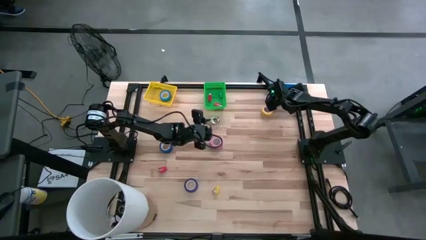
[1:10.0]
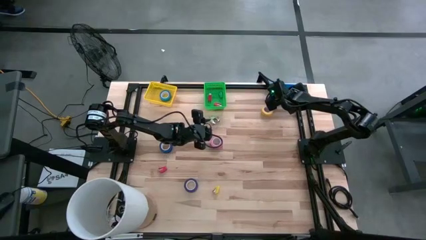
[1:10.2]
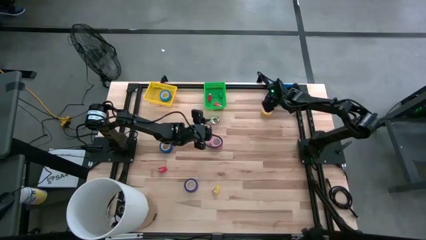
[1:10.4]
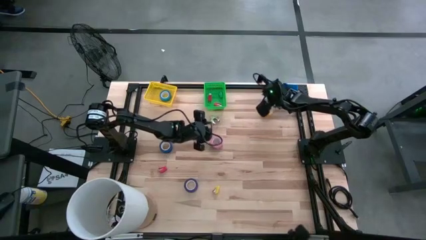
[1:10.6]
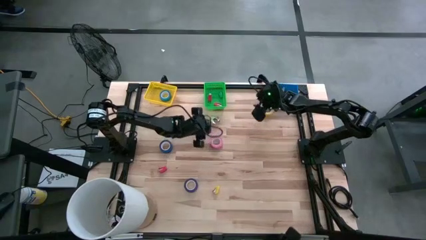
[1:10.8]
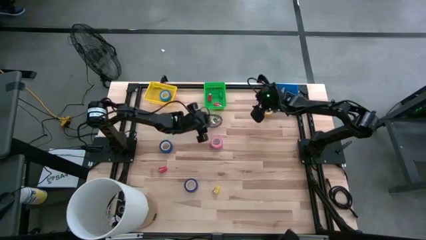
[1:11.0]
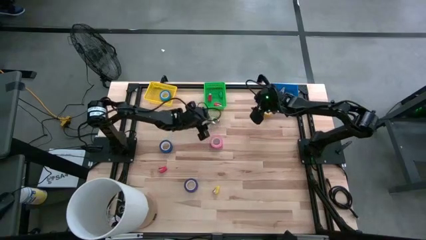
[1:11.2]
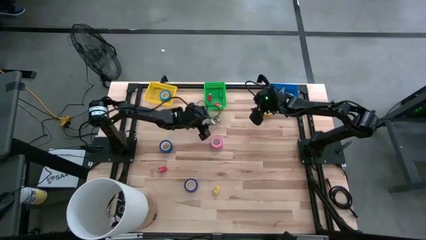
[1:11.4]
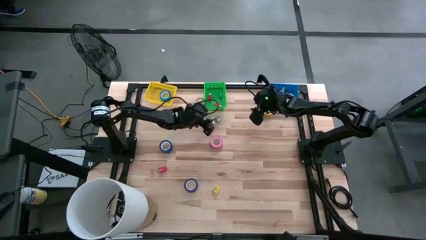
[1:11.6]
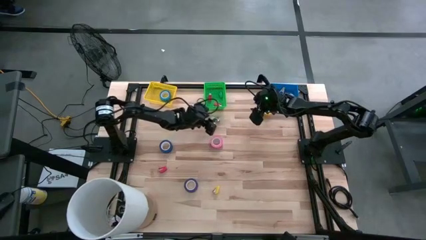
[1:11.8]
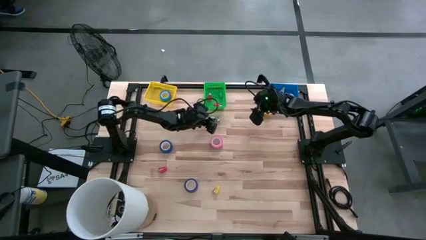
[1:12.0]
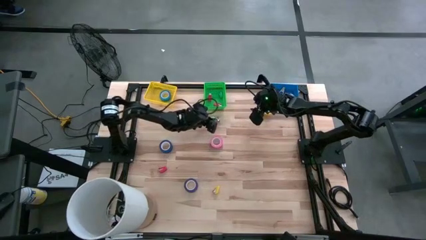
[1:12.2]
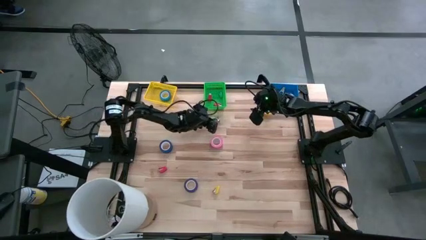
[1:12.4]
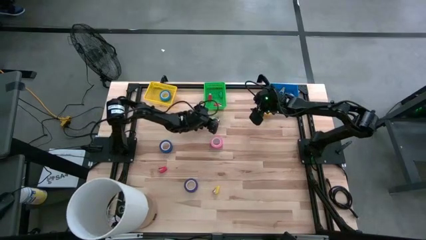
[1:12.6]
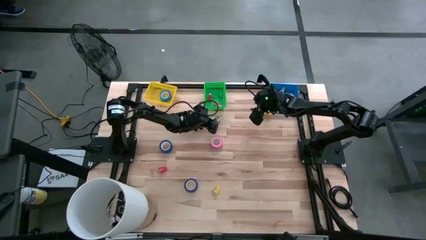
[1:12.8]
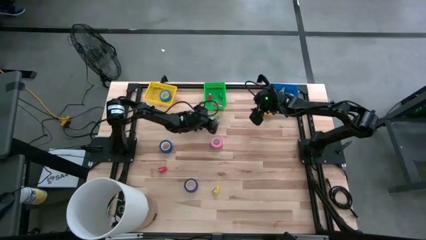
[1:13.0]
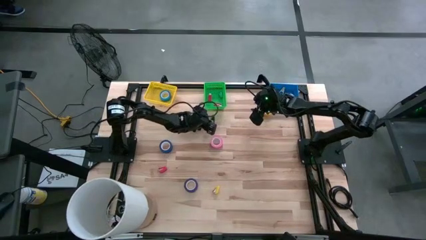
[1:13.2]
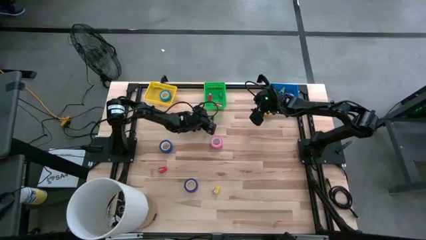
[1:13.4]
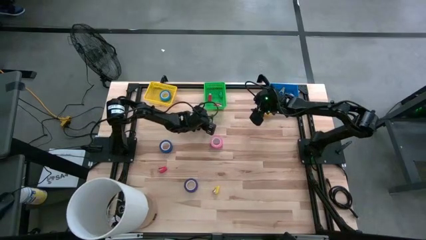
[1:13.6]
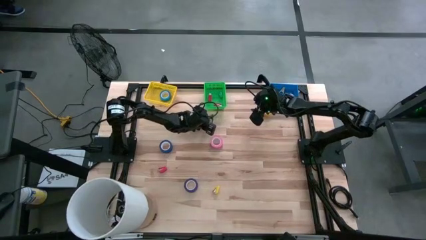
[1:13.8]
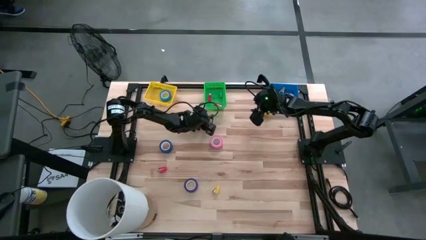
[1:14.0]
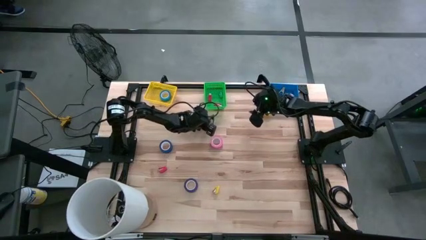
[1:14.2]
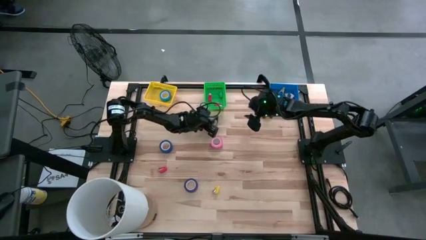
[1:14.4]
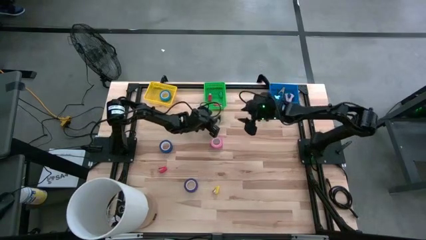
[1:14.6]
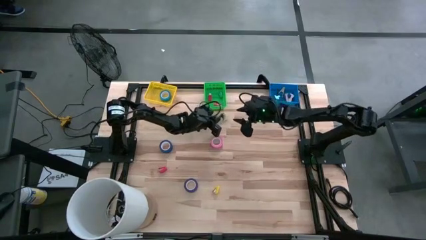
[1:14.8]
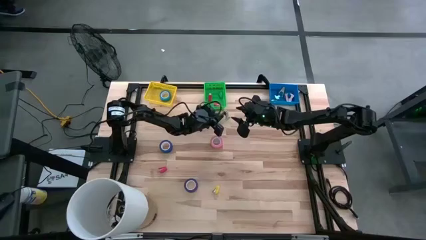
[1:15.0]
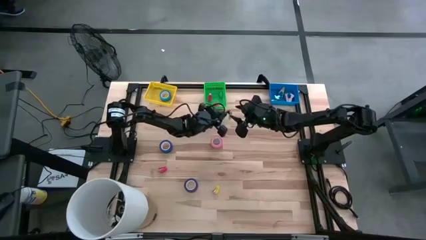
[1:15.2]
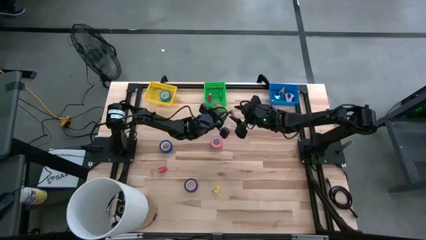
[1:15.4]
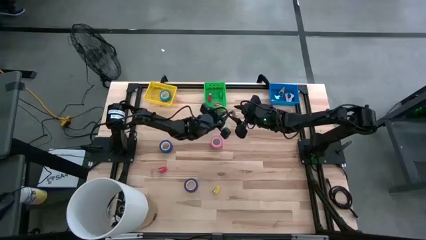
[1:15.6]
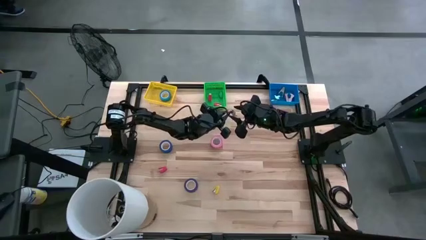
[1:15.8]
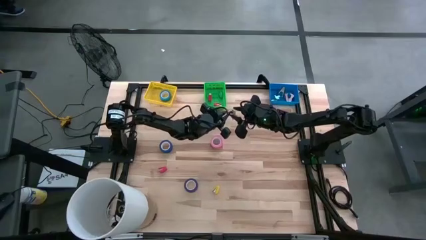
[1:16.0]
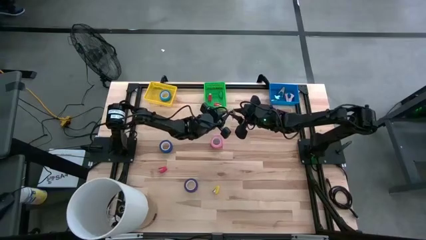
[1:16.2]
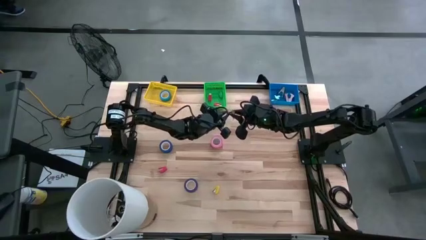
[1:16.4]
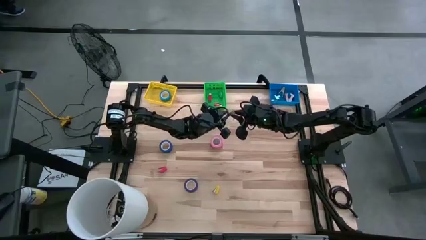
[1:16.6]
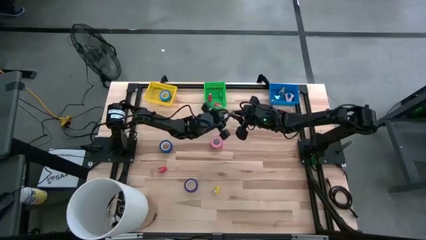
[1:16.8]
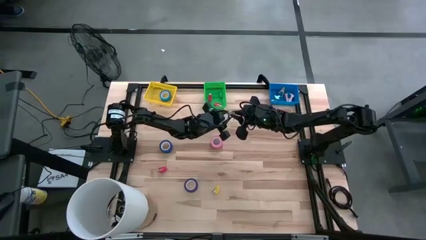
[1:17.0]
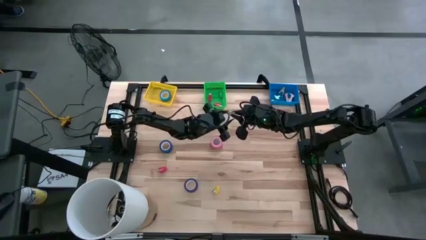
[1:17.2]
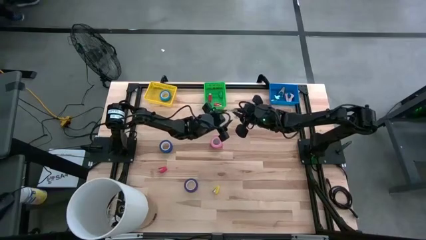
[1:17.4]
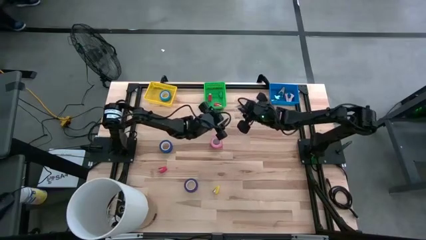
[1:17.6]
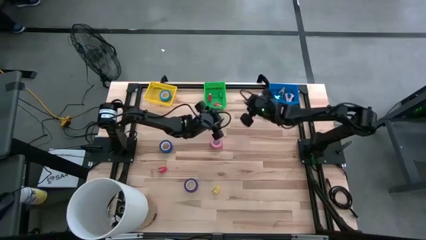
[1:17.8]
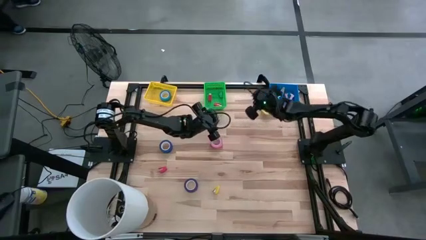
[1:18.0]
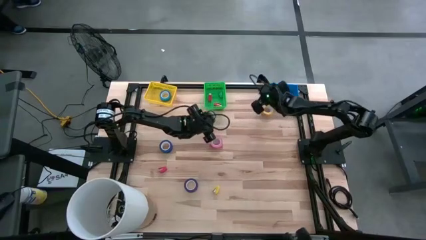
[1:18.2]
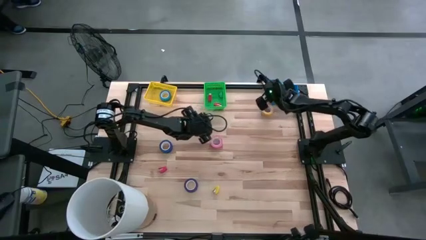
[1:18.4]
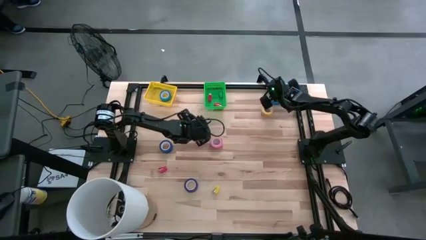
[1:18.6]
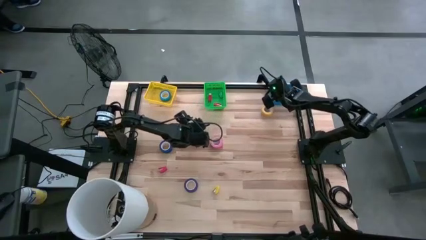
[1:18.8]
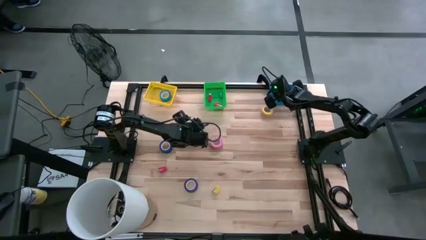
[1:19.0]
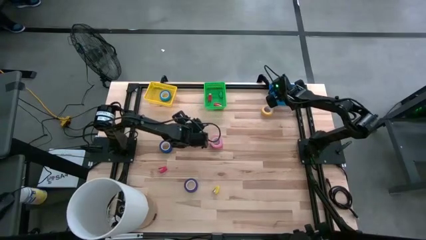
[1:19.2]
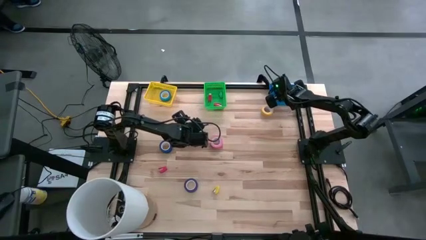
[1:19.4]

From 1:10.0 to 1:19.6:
Task: Pick and place Stapler, Stapler remover, tape
Put the gray staple remover into the blue basket

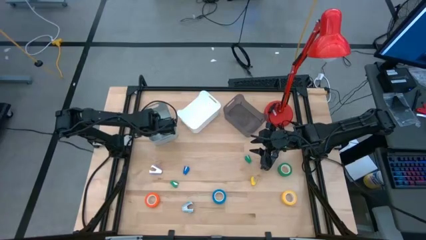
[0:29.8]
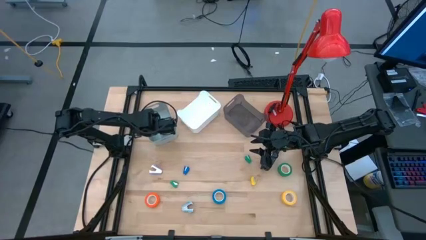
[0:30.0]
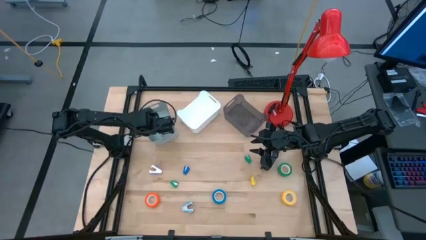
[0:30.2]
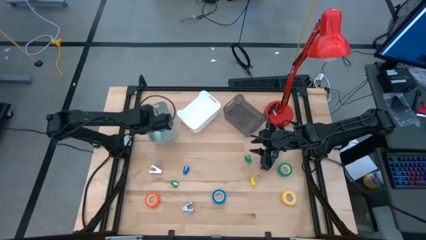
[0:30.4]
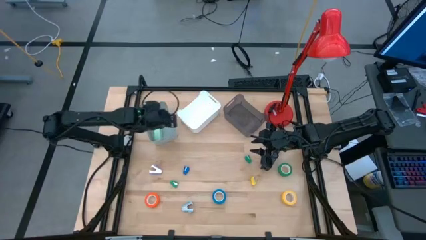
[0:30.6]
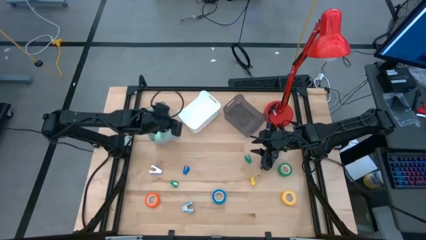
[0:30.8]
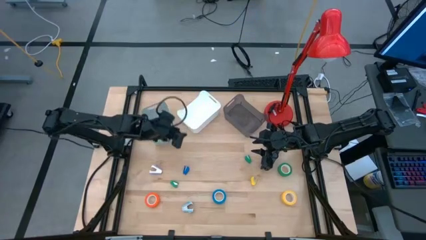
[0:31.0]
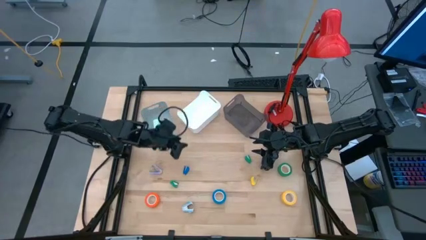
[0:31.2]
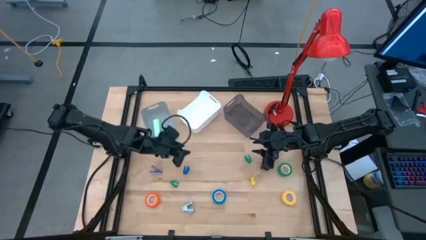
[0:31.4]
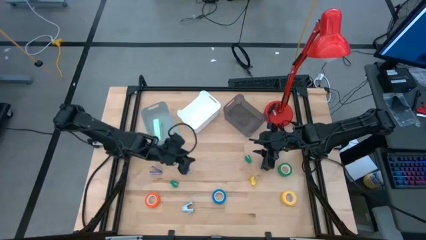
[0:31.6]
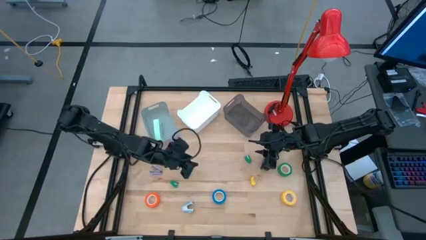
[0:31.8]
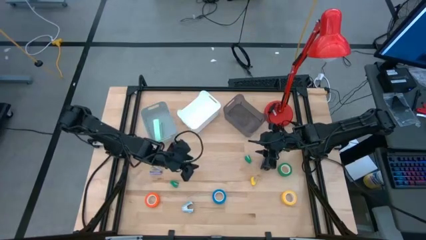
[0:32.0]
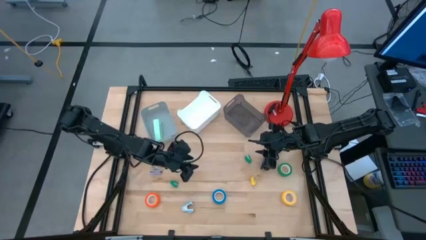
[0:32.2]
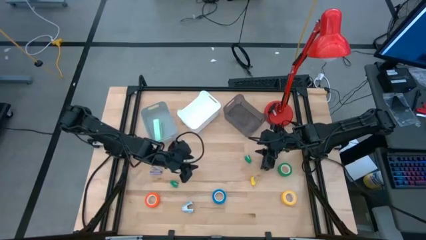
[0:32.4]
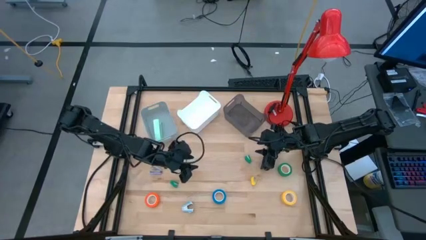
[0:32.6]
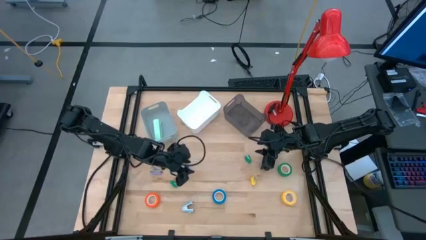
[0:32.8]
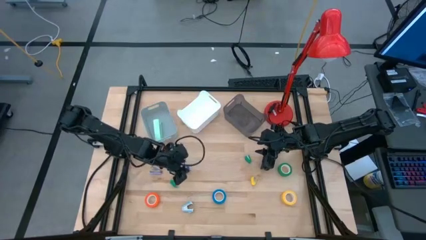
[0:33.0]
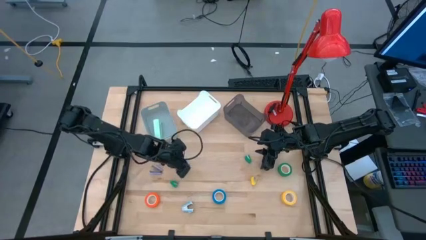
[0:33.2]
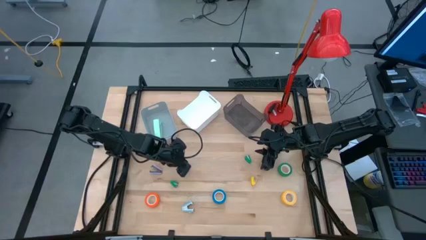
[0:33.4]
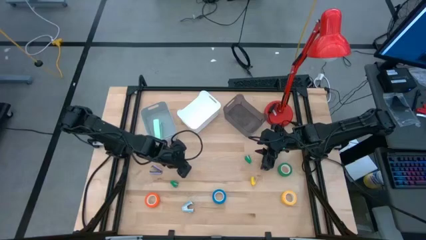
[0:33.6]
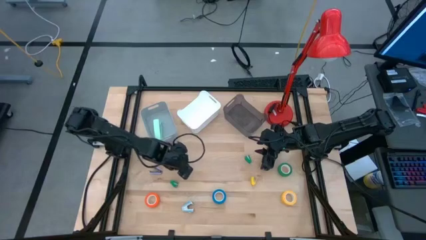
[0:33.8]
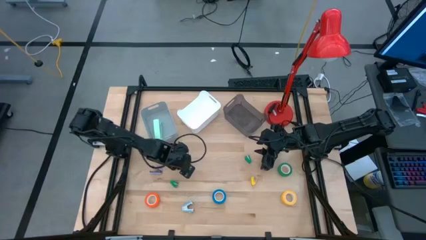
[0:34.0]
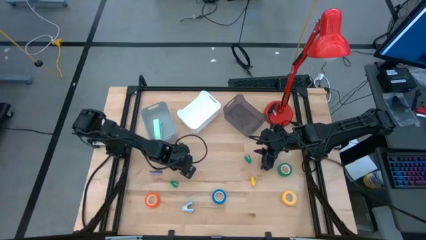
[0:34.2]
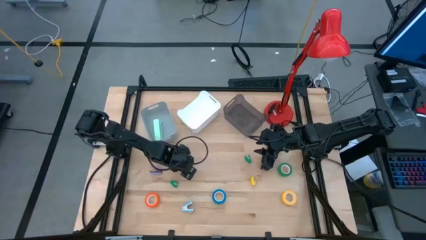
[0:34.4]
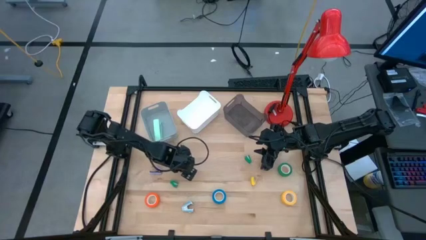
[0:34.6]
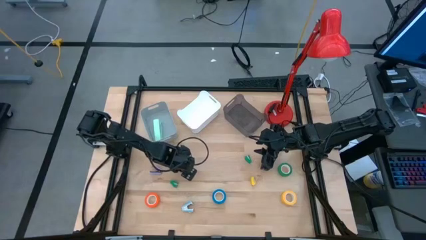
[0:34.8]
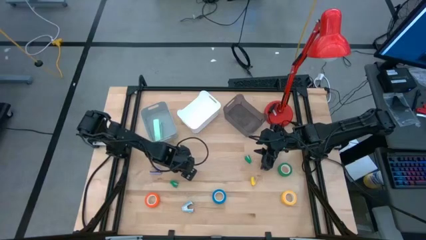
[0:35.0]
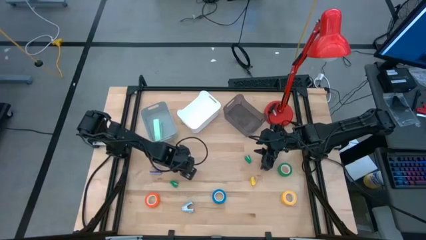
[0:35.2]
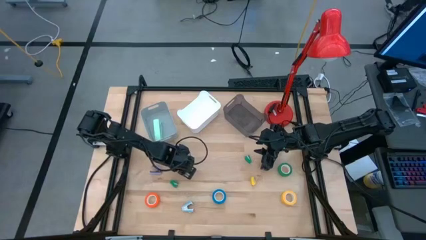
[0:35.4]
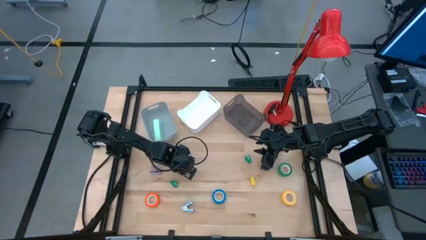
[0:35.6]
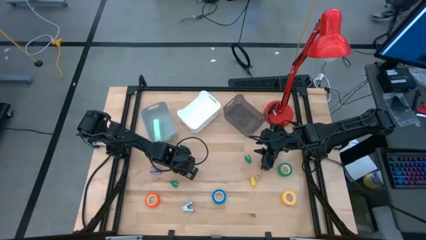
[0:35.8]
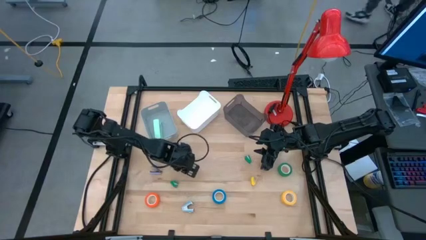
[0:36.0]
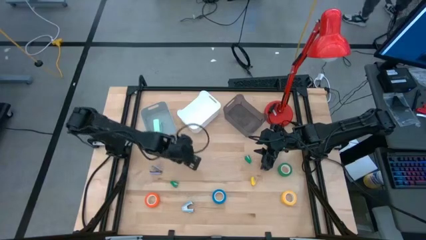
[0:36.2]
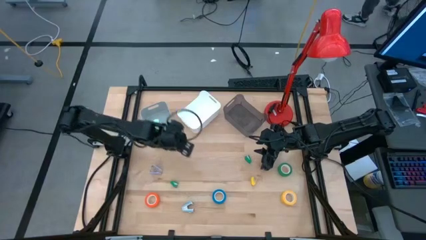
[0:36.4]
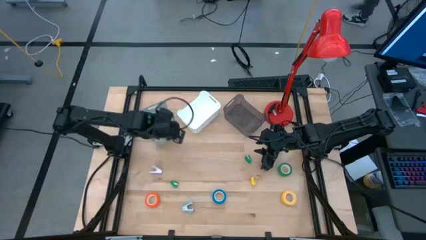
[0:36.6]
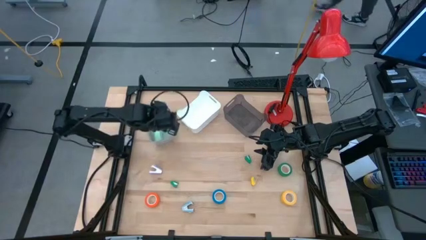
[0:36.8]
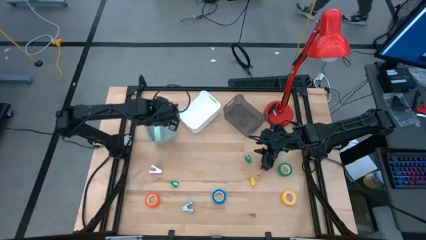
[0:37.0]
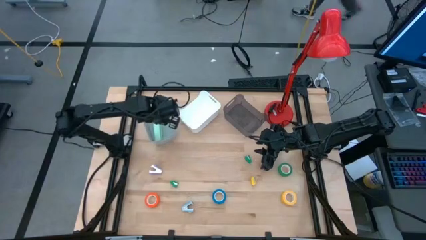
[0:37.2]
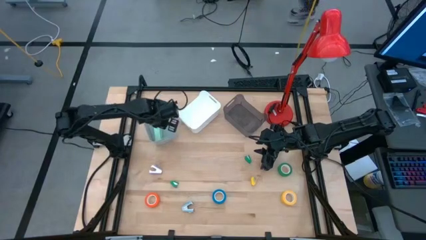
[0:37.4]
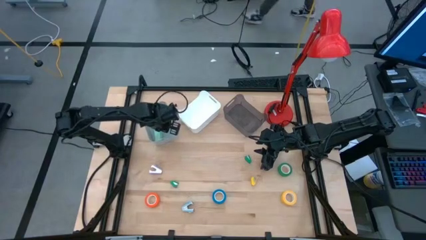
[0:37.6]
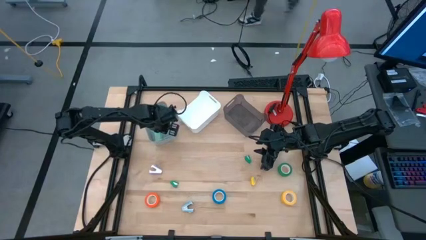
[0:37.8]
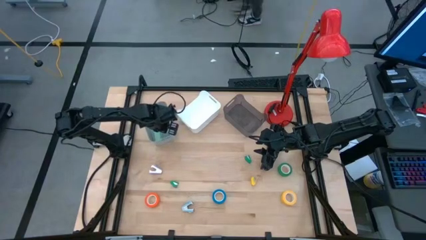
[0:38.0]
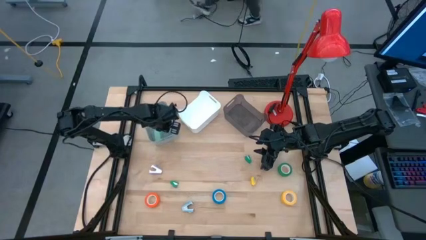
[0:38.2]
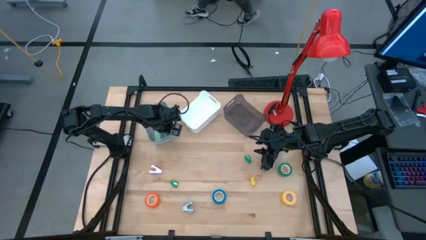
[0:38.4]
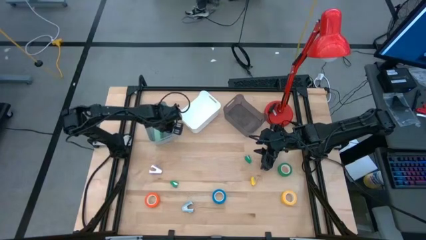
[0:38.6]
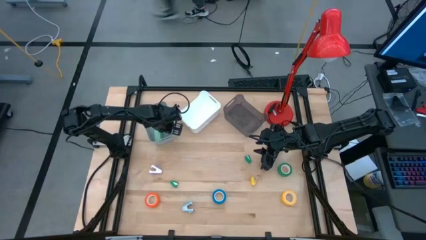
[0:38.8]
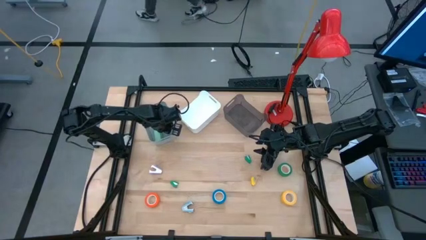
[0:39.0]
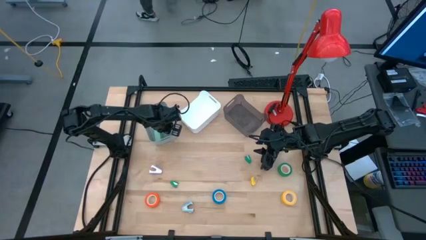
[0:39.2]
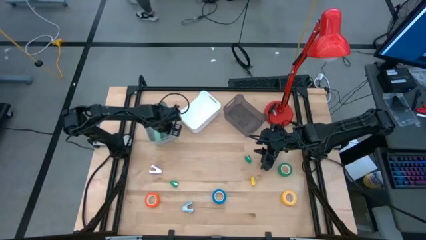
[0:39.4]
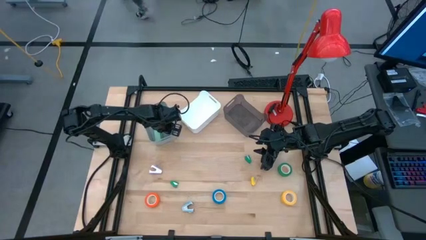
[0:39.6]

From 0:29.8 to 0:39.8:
Task: Pick and place Stapler, Stapler remover, tape
Put the blue small stapler into the gray bin
